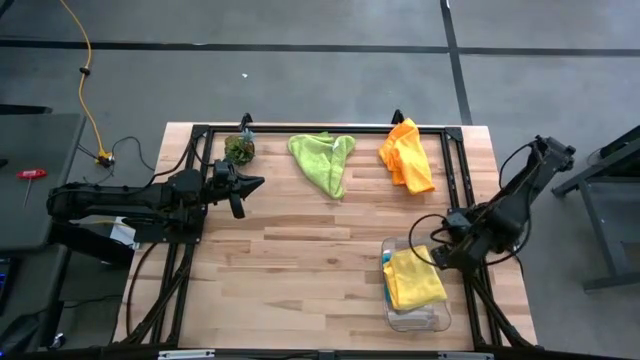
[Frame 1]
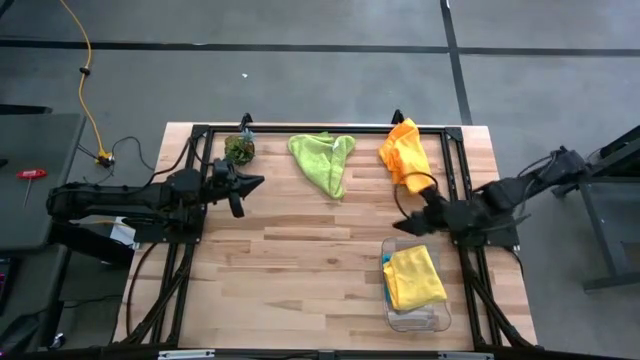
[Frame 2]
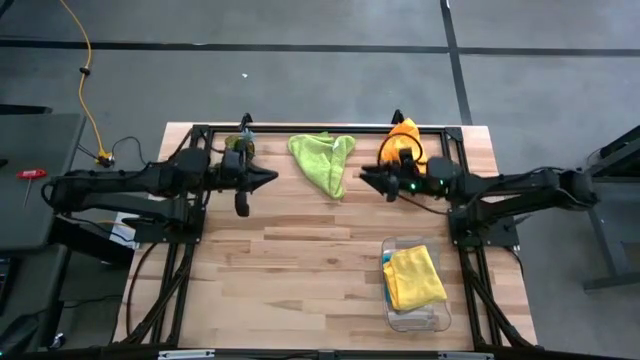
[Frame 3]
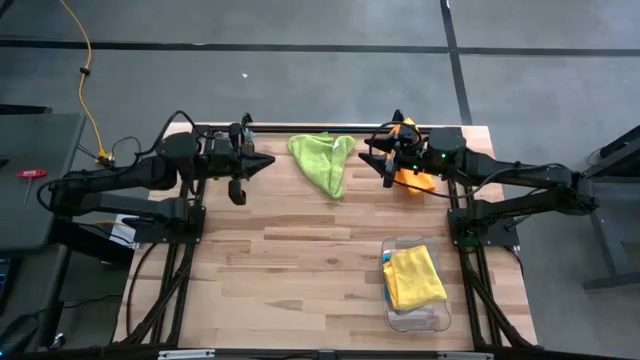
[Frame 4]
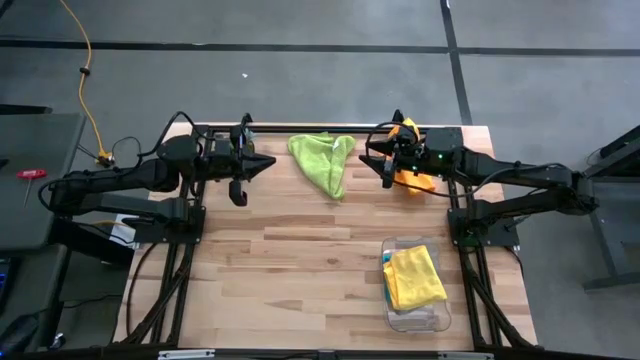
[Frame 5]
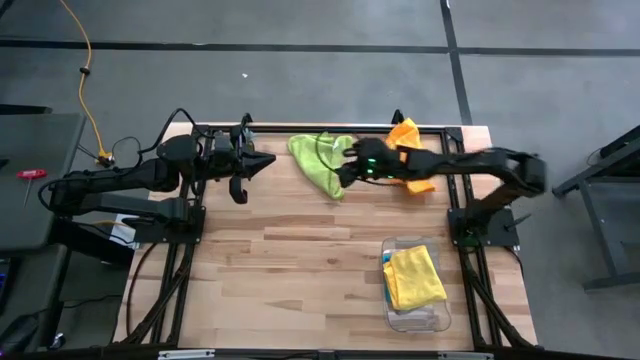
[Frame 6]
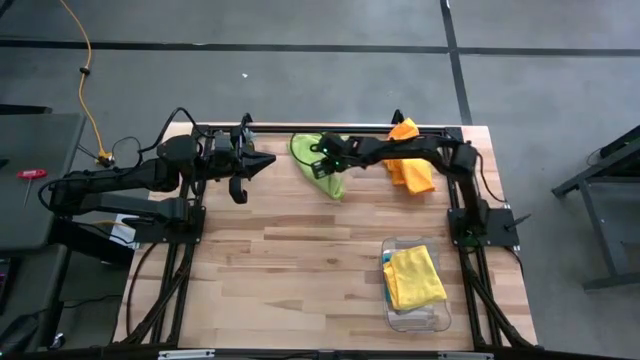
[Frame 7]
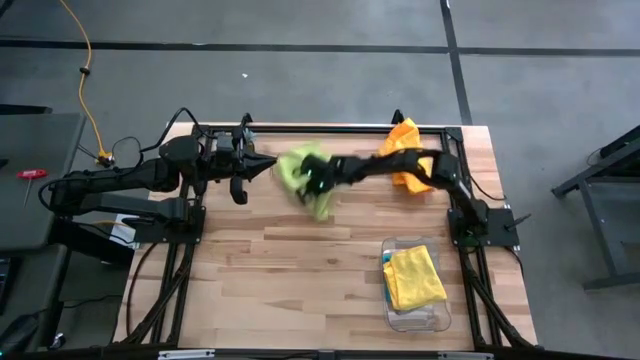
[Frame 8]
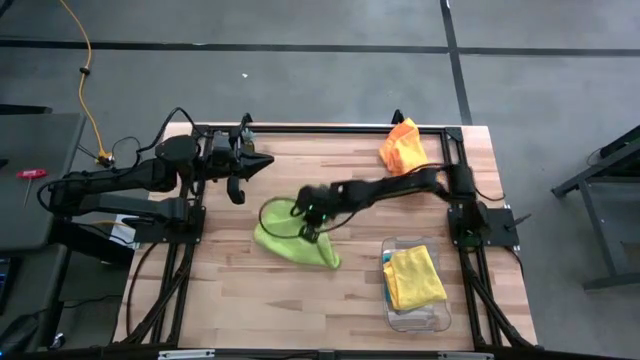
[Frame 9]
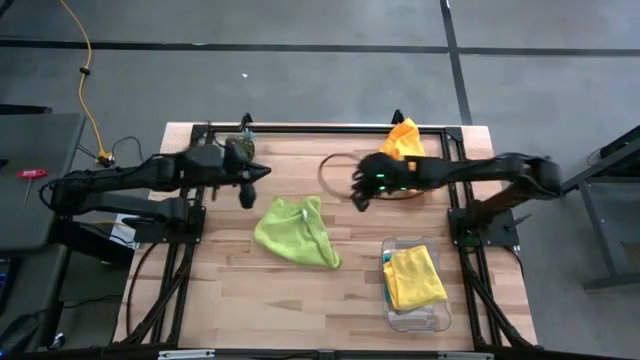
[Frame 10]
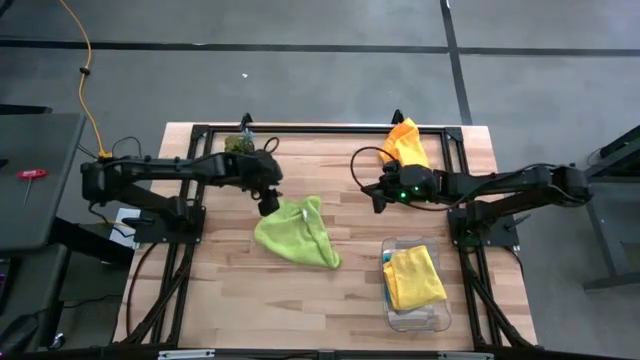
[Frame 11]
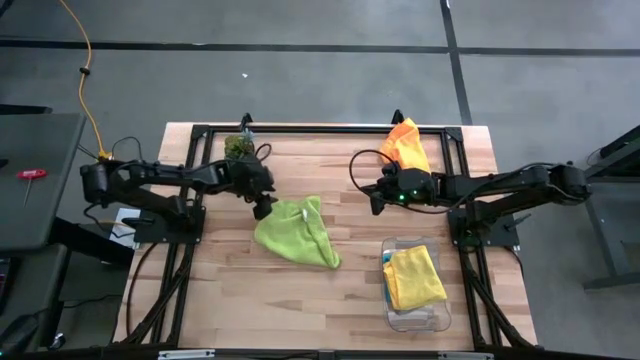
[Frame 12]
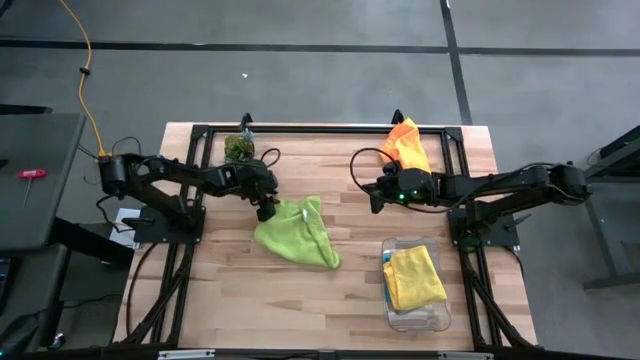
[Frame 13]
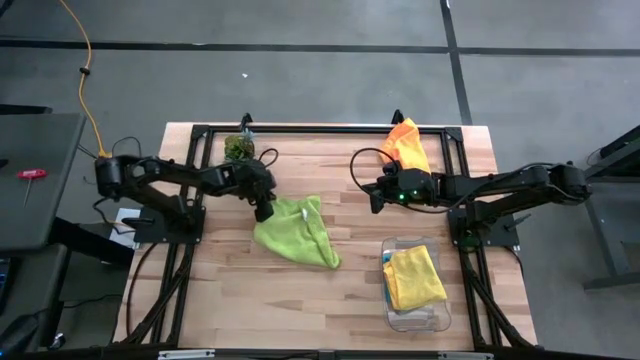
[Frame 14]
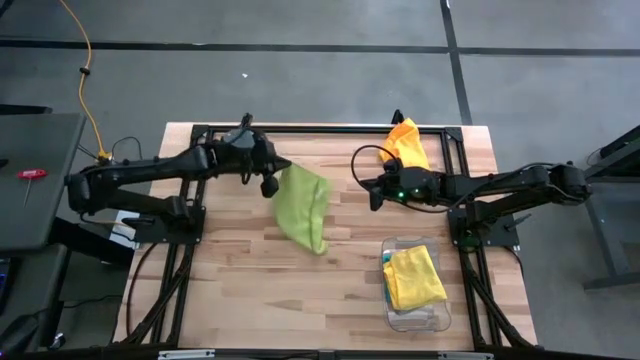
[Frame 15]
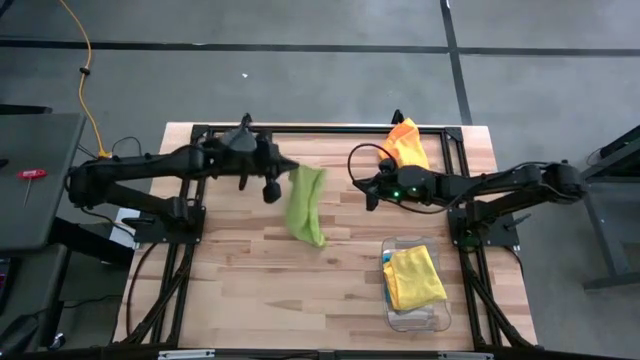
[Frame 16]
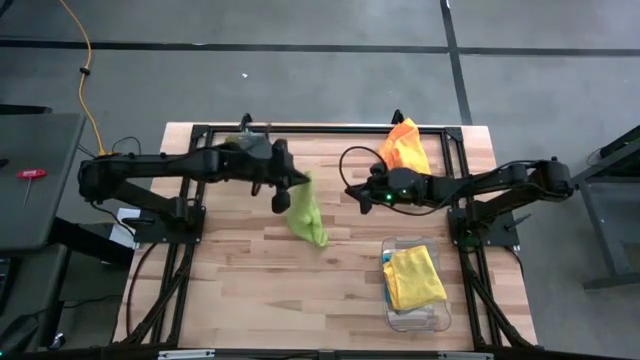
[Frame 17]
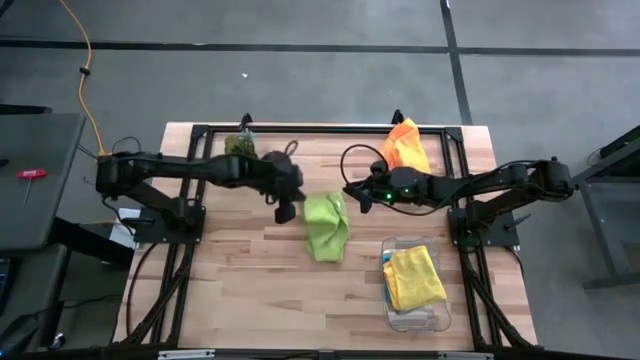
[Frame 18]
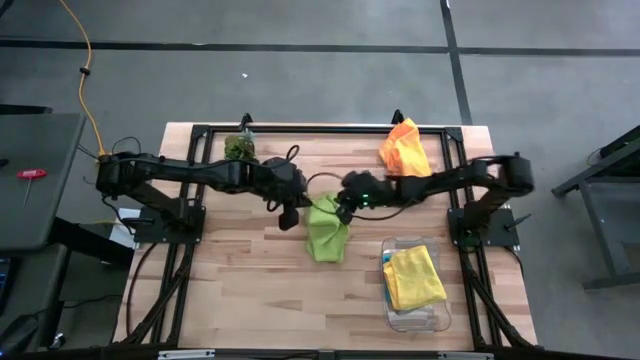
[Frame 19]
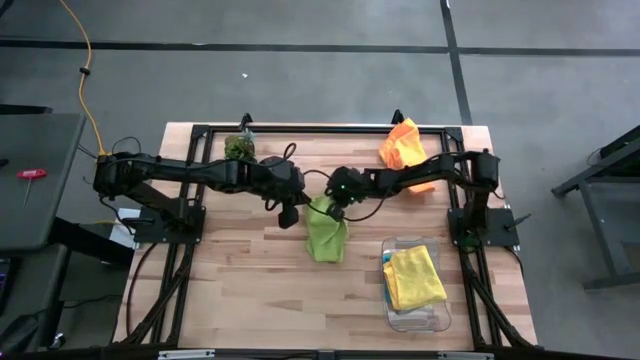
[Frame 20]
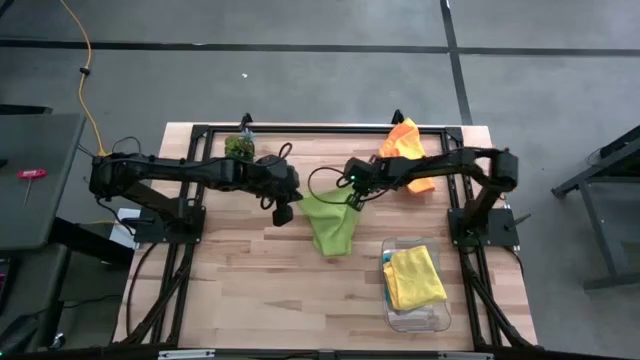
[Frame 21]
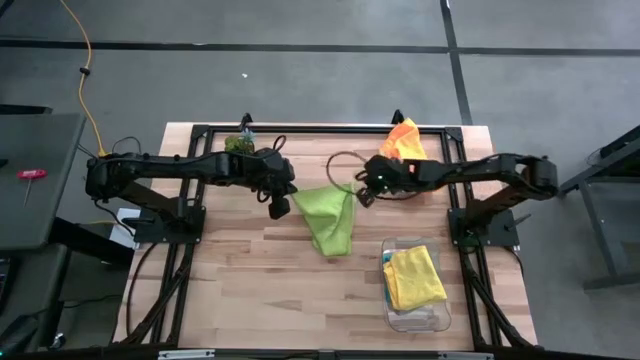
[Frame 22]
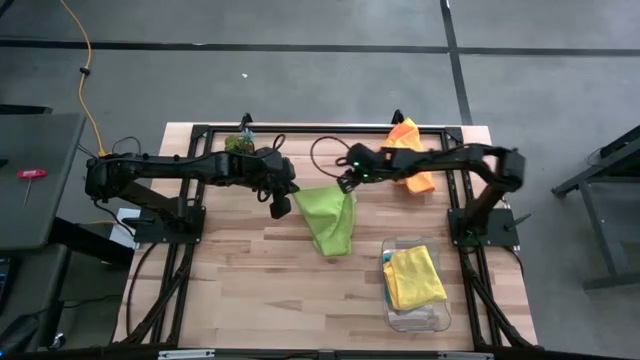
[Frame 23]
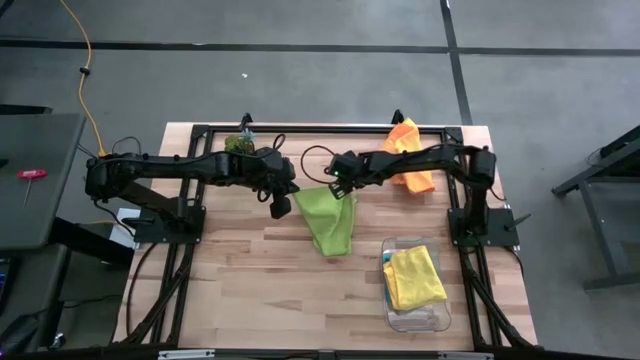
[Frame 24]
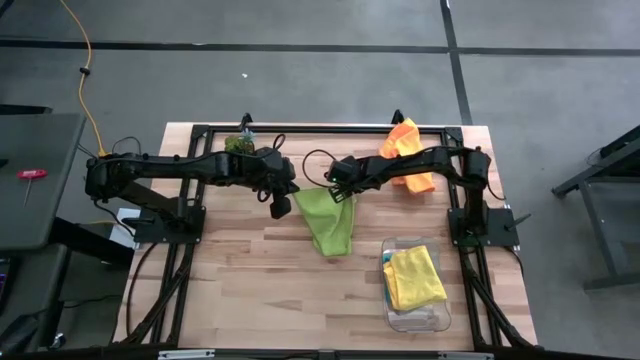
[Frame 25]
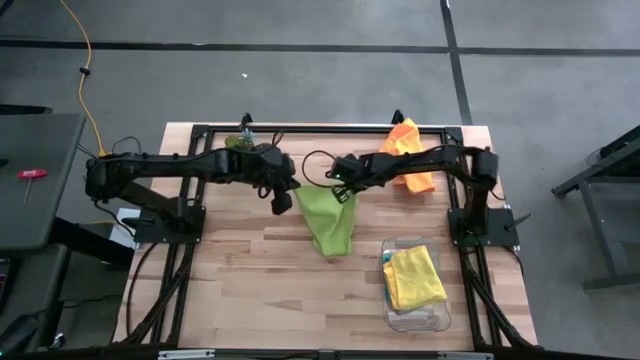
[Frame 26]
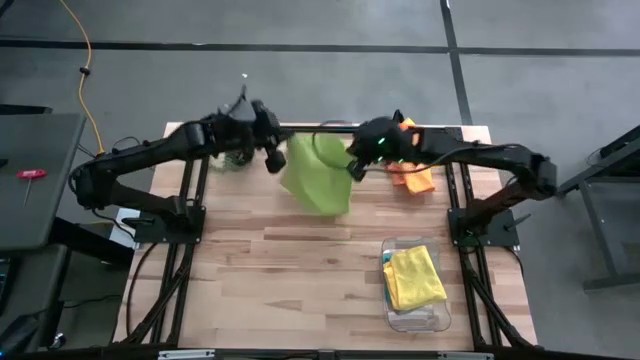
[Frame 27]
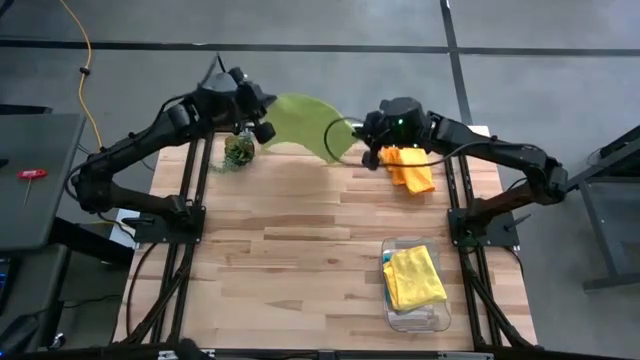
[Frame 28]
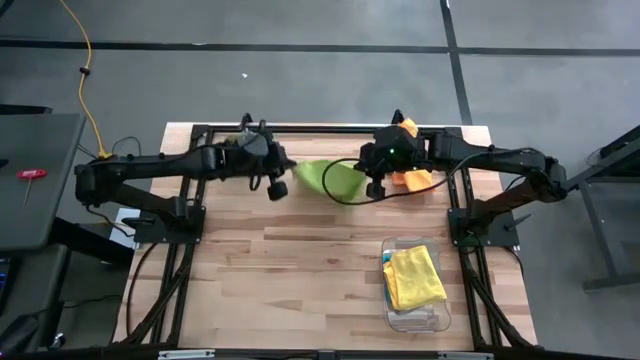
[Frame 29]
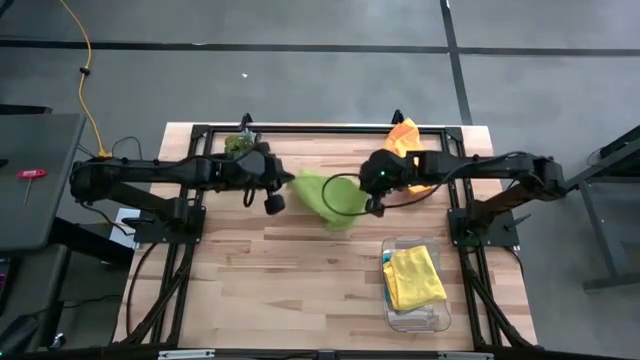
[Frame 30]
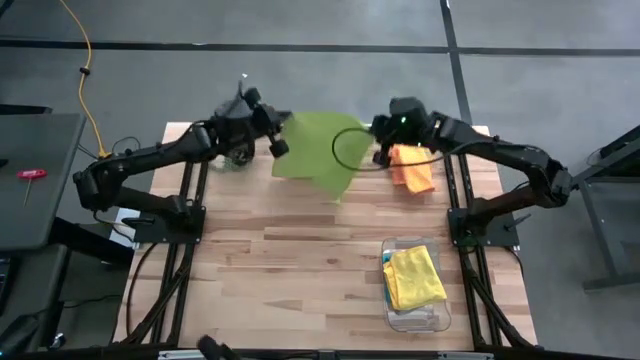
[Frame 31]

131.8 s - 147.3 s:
Task: Fold microfiber towels
Fold the green microfiber cloth

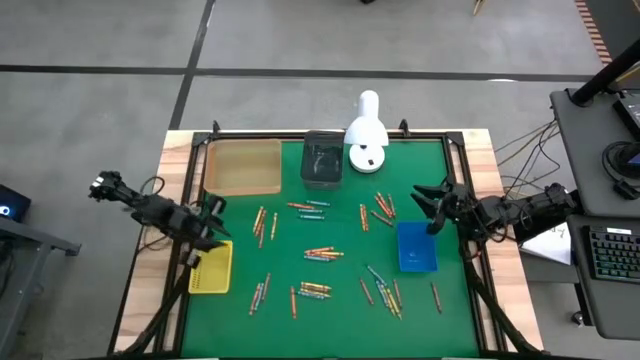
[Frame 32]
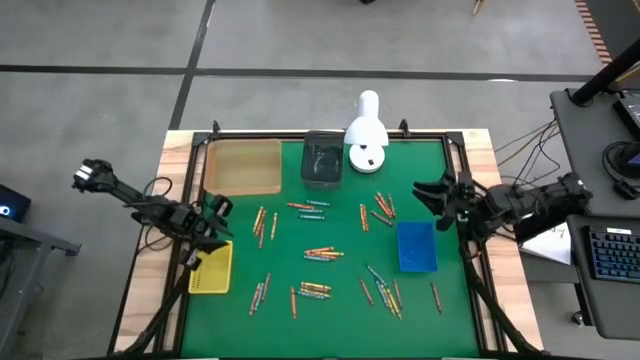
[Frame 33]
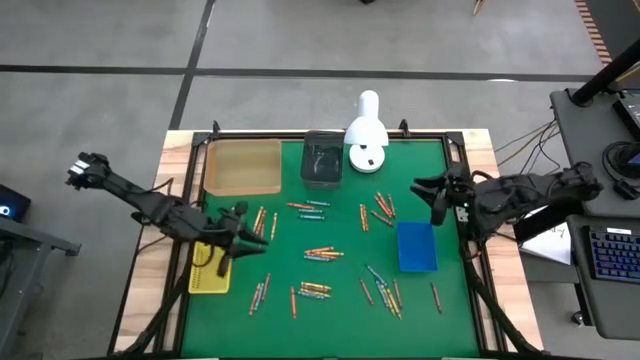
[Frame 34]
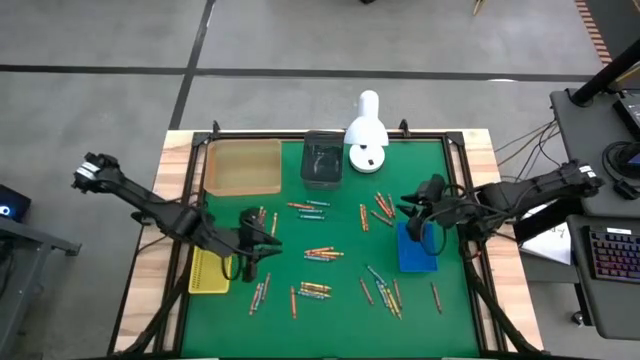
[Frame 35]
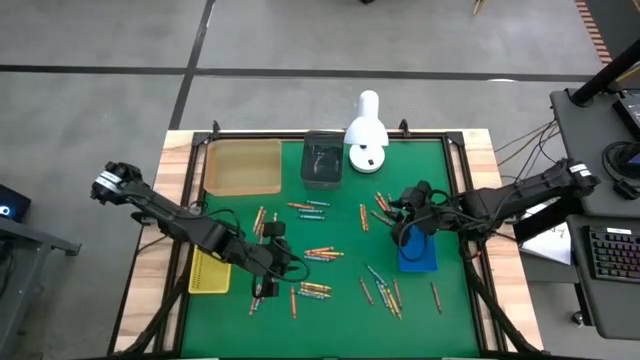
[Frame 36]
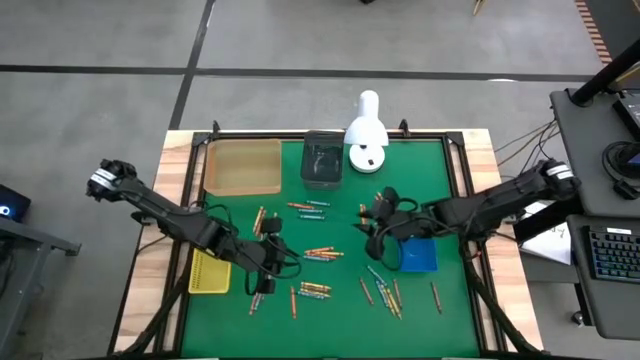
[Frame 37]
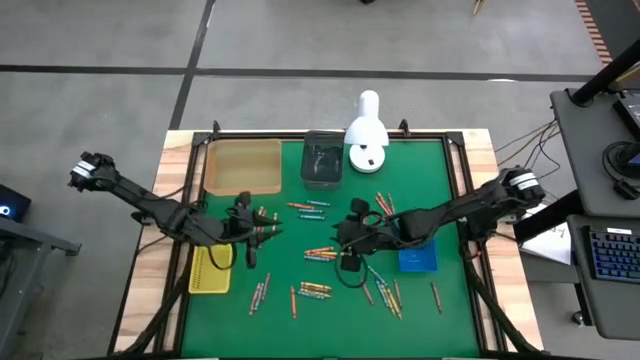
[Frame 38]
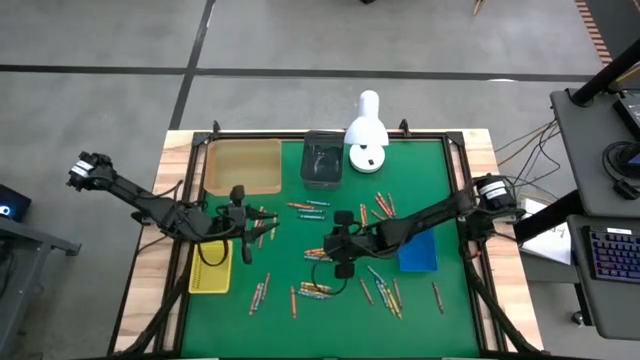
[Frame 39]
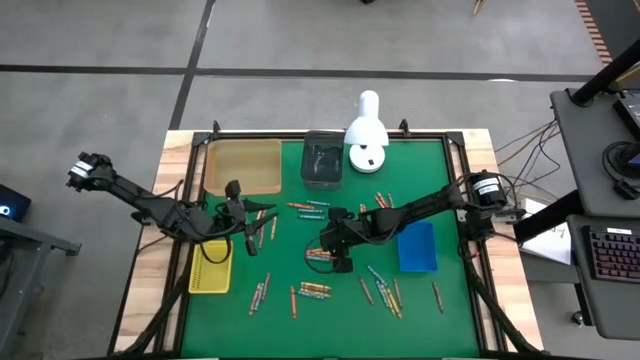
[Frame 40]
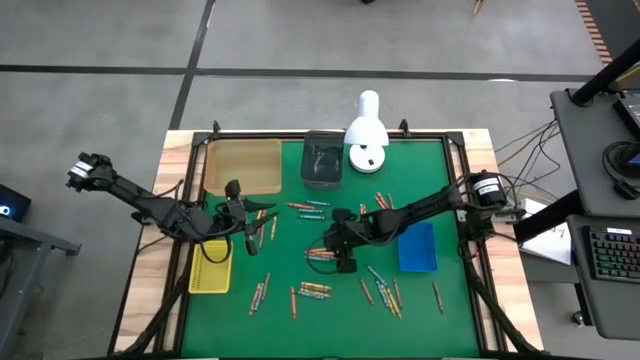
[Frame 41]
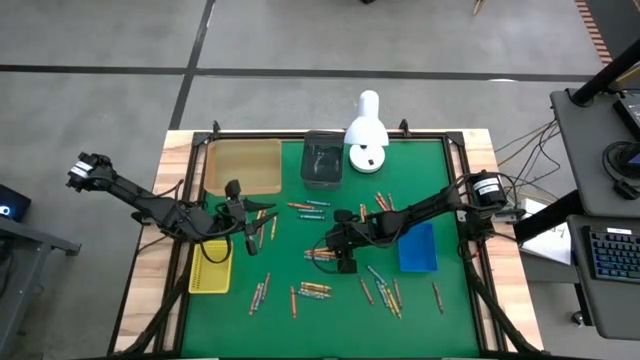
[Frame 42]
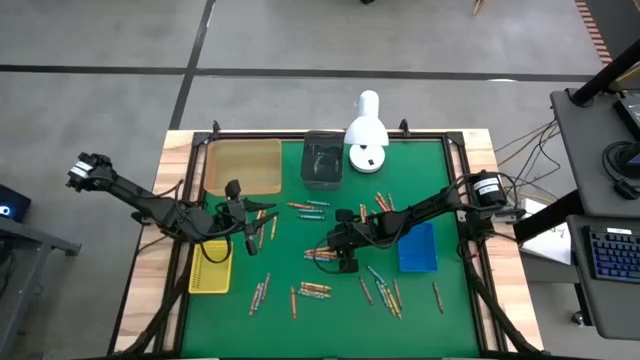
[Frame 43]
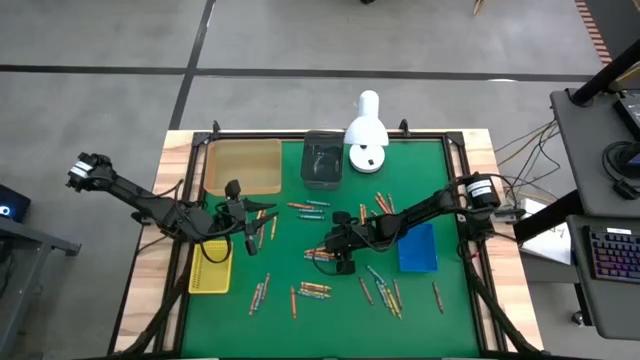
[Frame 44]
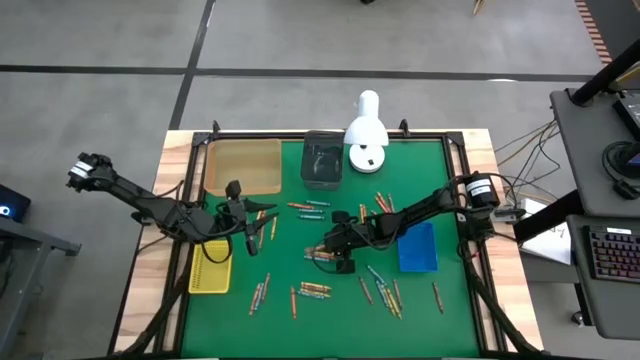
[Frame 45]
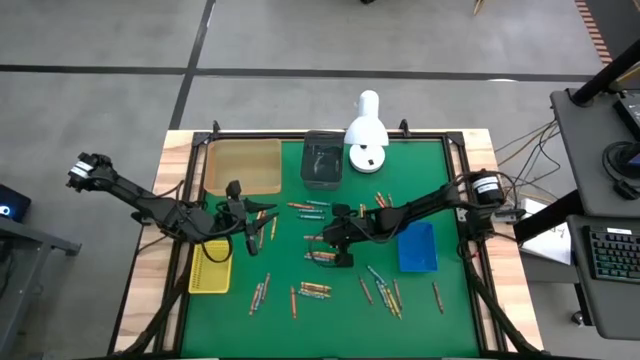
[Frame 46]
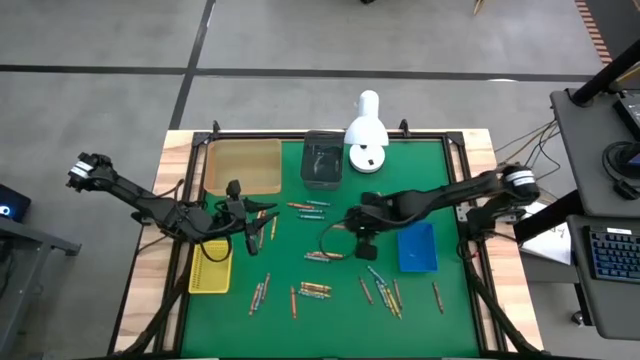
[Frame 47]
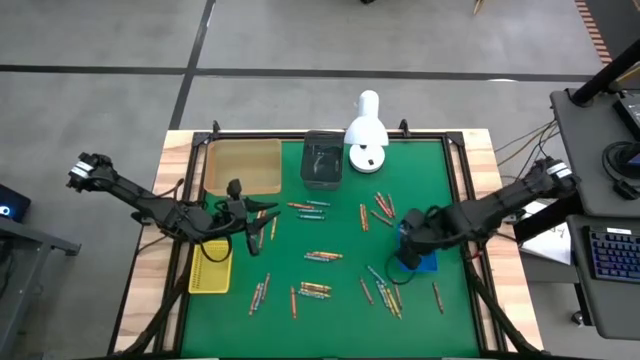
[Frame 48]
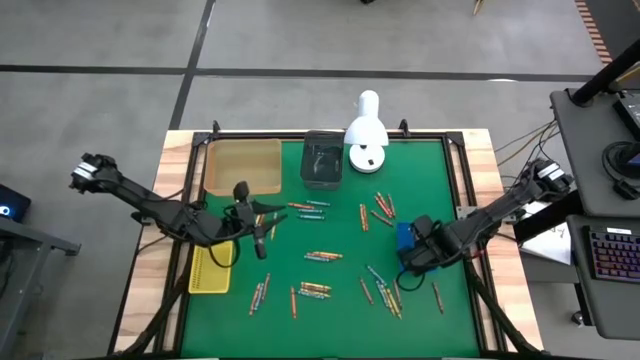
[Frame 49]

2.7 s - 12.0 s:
Task: Sort crayons
Put the orange crayon into the blue bin
